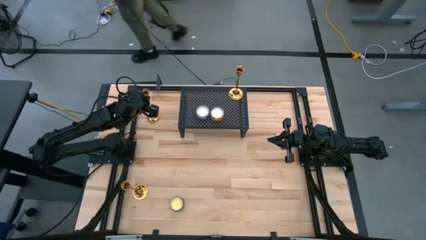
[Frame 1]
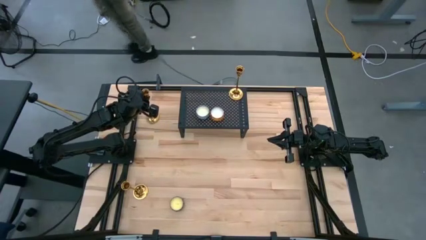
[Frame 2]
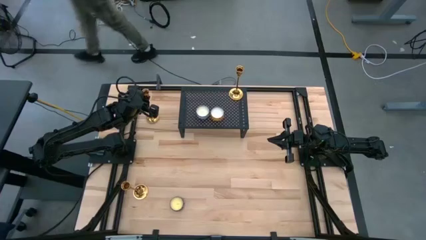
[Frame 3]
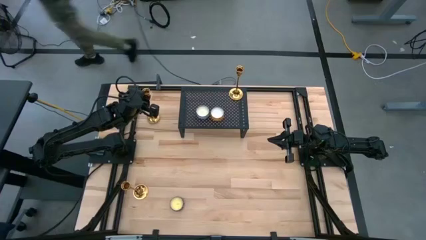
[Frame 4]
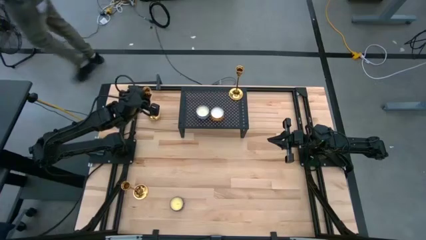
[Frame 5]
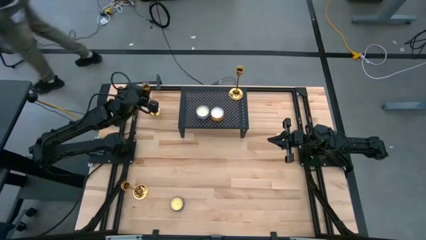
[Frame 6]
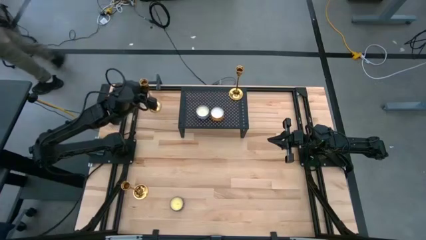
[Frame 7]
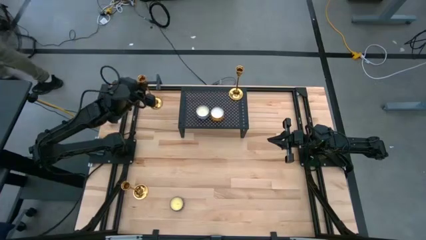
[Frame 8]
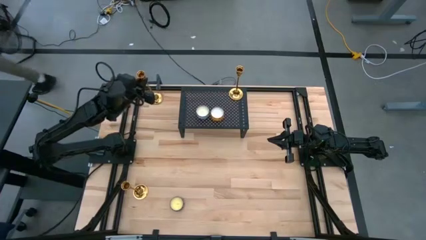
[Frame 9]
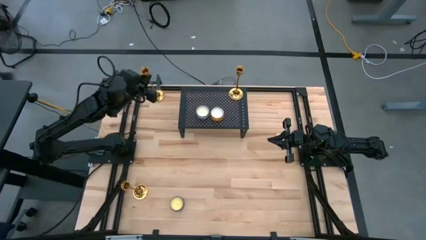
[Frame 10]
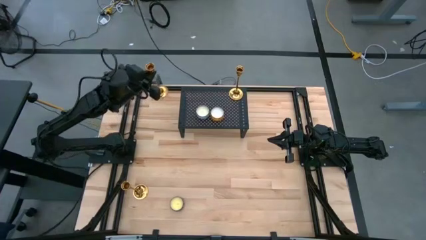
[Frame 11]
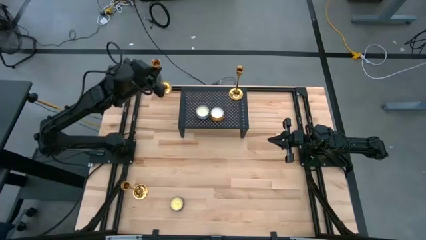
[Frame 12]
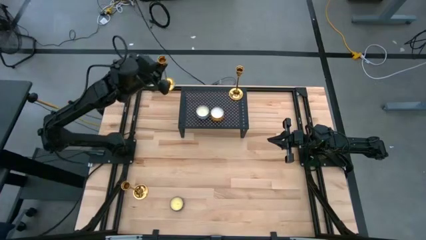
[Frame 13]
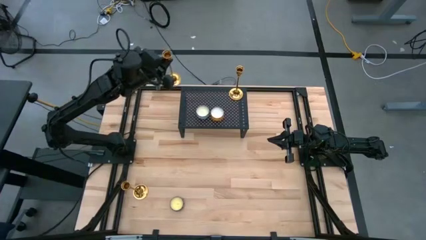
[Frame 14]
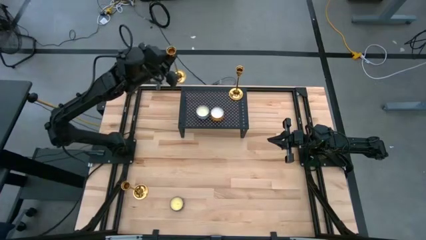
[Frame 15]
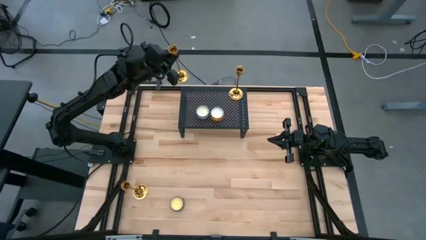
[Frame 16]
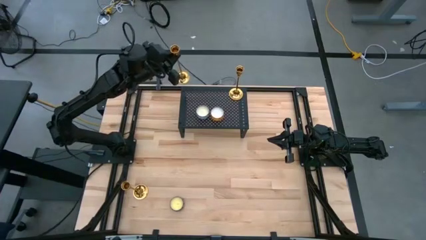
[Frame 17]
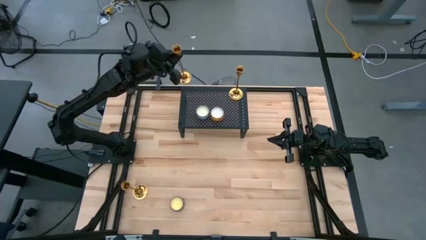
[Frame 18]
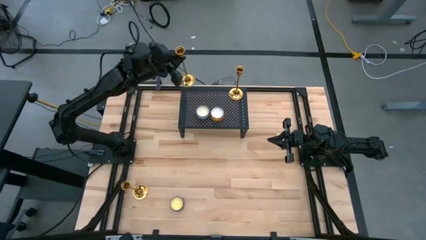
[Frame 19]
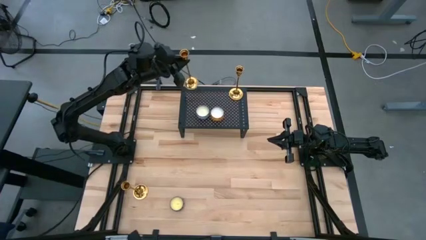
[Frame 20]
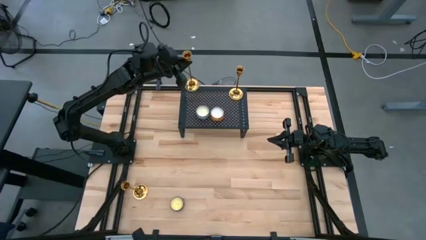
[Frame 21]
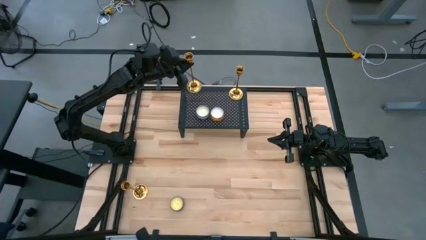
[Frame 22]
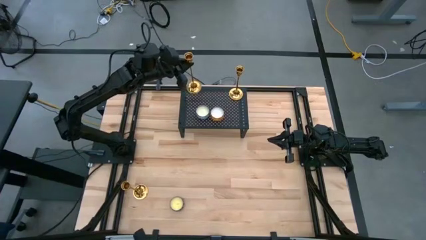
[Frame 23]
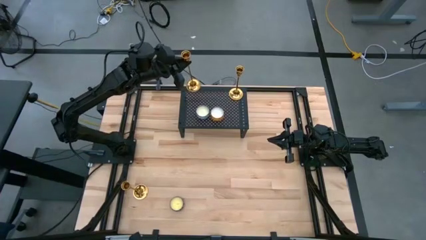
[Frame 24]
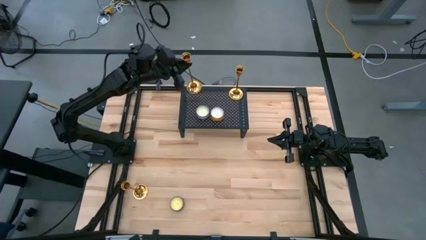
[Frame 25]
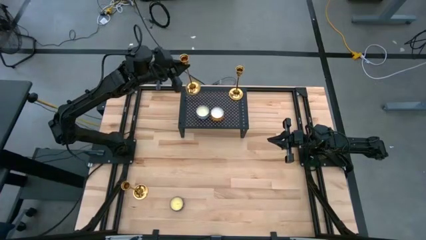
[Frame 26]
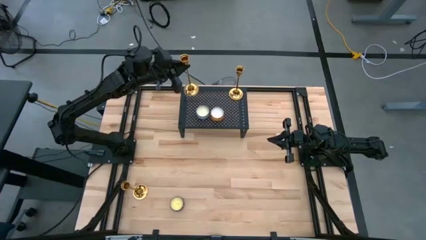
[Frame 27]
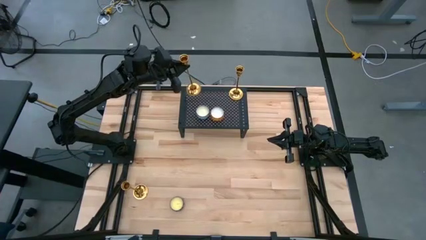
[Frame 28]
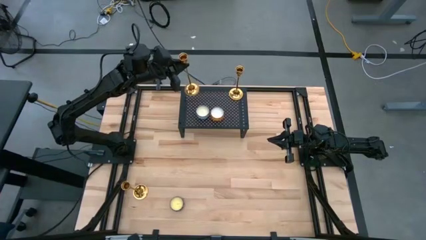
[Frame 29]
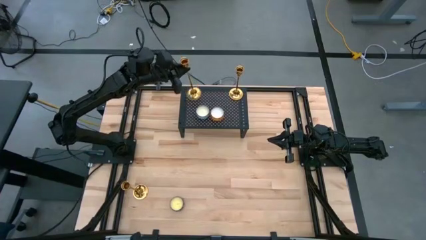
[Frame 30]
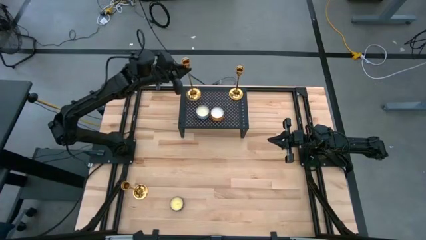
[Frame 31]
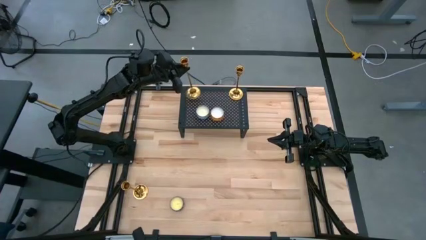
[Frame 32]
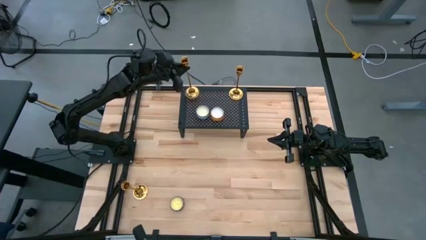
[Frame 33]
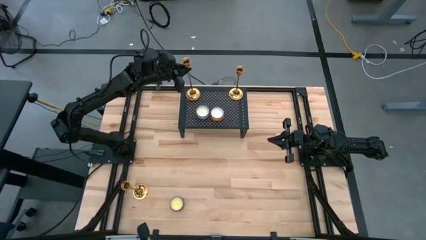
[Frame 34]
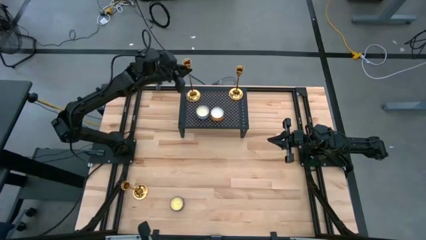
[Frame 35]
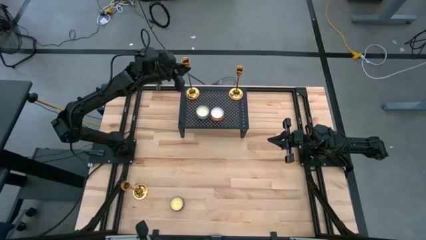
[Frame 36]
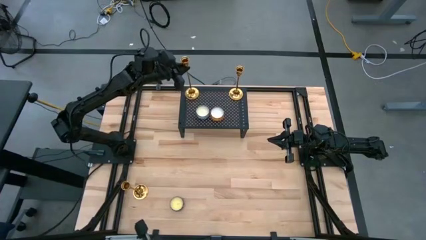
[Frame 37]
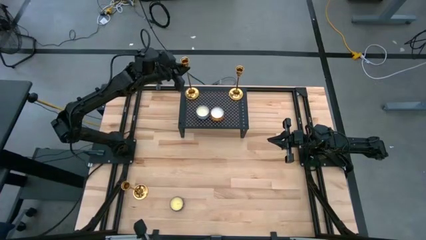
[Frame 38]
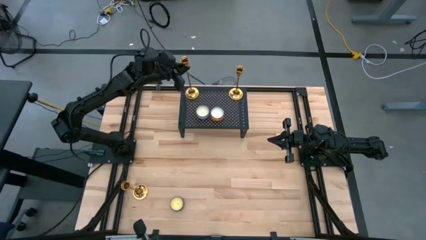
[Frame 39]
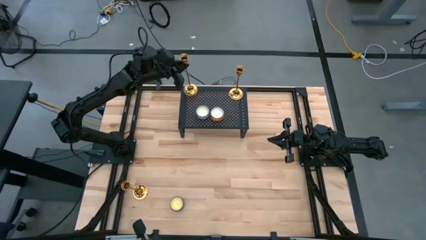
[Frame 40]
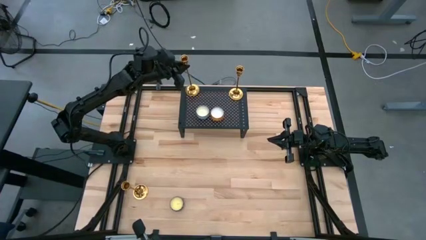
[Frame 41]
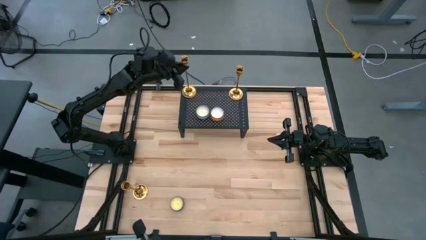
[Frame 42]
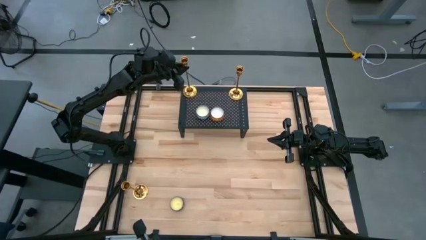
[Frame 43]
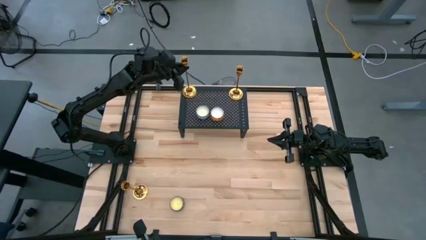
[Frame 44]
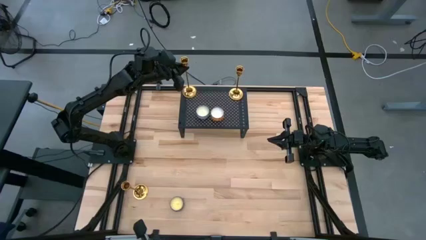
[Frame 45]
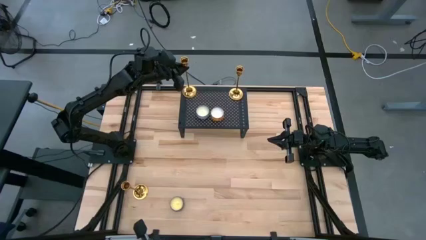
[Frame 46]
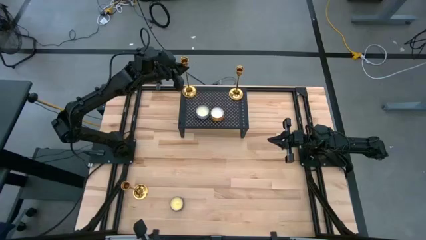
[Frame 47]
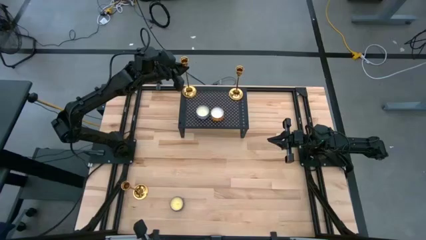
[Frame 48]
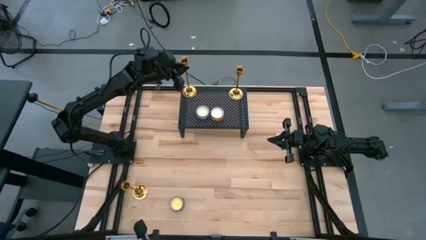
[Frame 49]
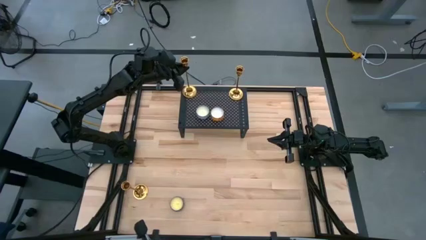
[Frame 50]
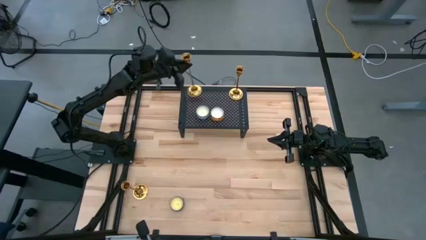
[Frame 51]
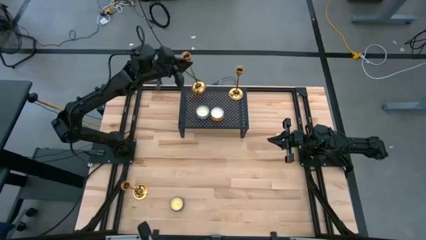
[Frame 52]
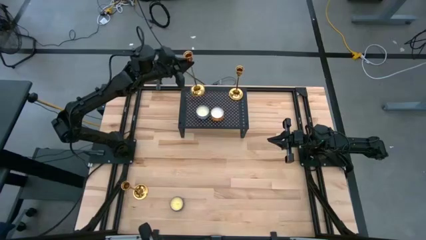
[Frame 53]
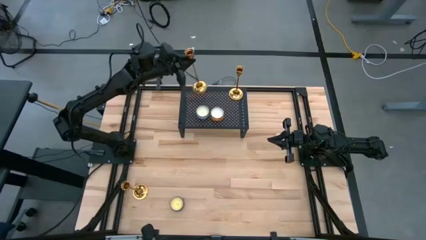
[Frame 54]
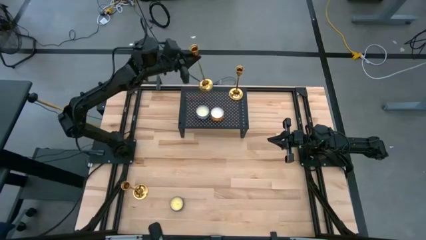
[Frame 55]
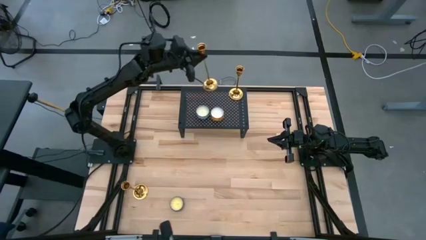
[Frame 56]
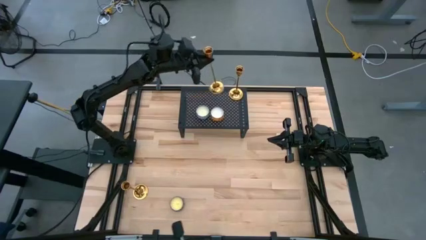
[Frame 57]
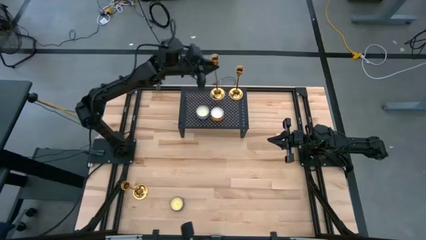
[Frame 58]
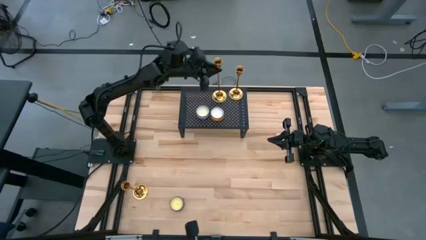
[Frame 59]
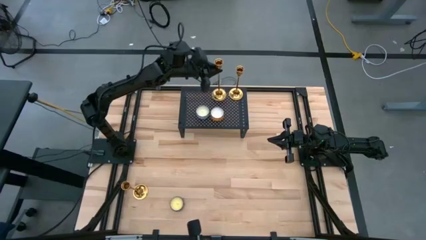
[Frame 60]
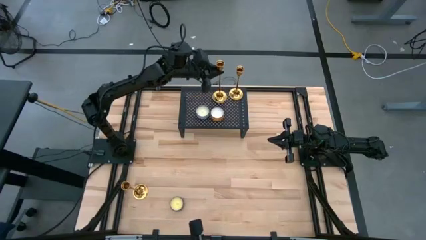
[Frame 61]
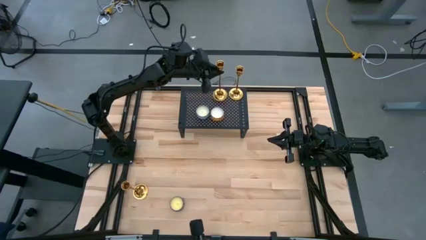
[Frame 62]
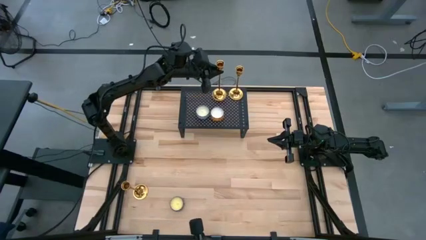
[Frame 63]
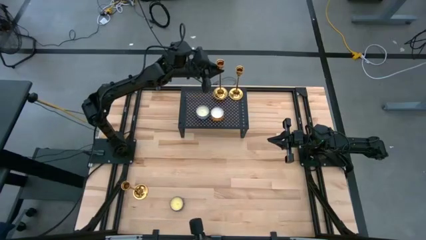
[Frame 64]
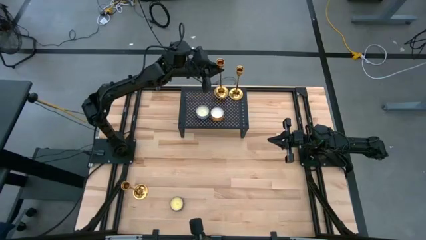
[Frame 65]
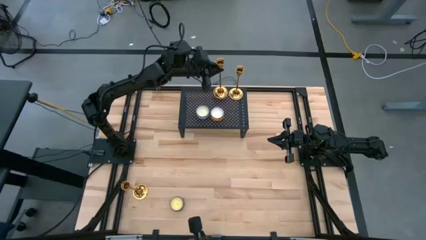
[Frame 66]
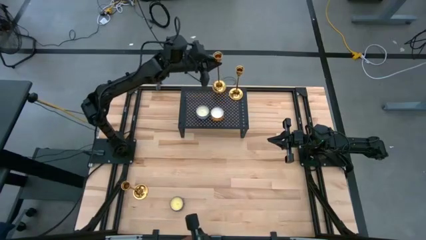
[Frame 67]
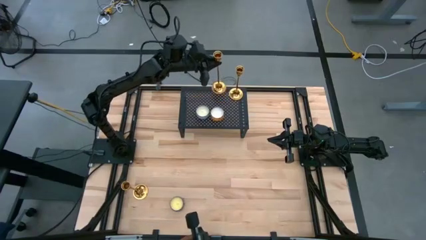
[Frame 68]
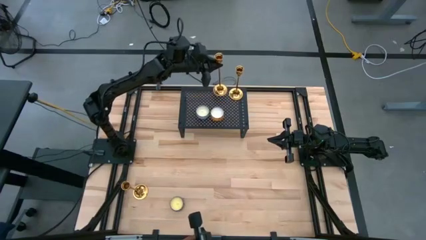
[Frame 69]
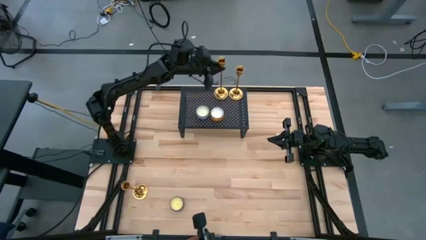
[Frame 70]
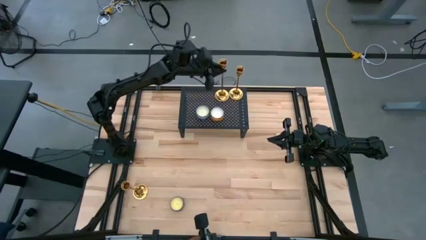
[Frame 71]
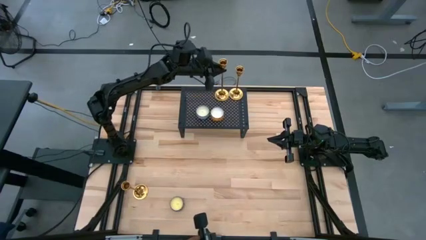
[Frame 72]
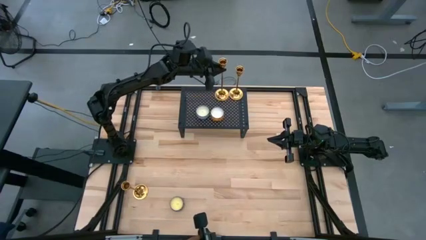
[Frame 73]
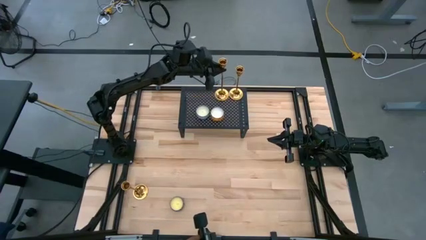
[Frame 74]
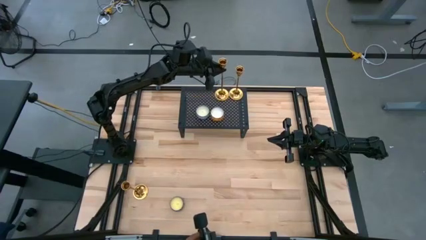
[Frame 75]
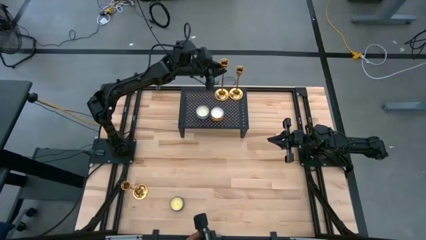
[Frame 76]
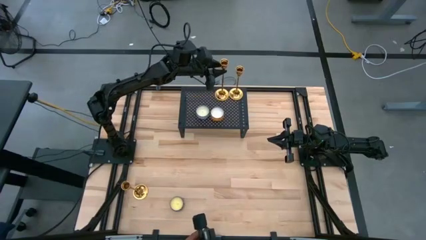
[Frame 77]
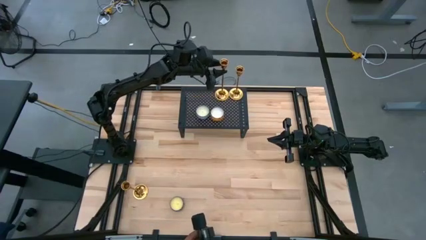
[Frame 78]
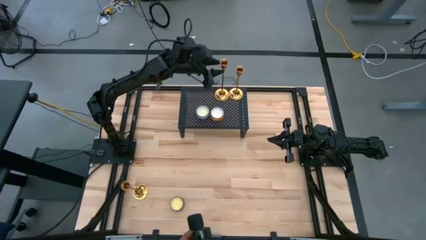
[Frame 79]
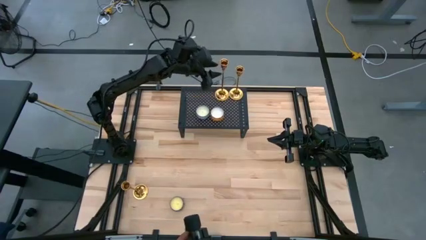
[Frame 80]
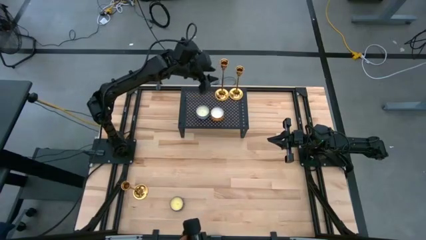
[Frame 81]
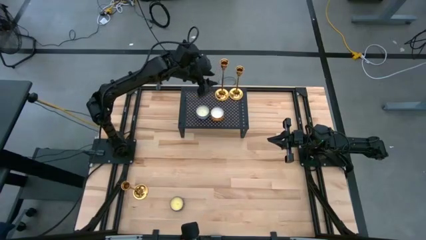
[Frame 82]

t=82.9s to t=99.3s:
Task: Pick & Place candle stick holders
Put the top gold candle holder on the shelf
